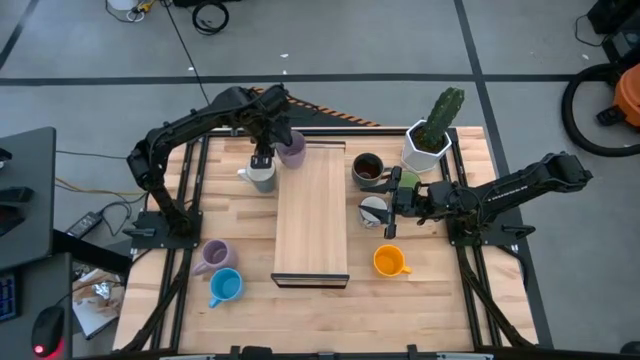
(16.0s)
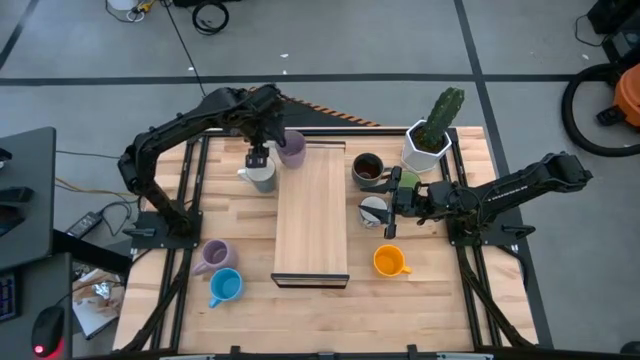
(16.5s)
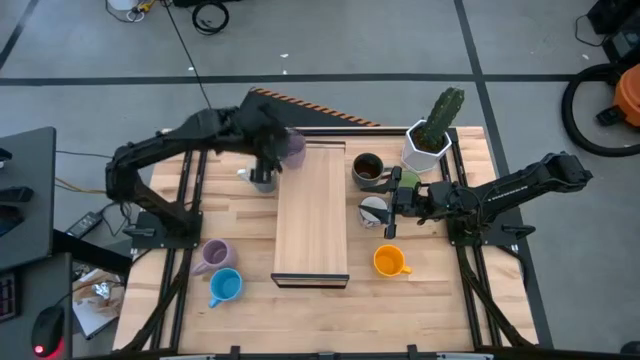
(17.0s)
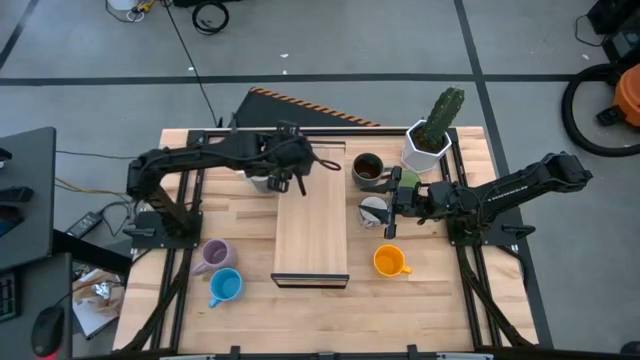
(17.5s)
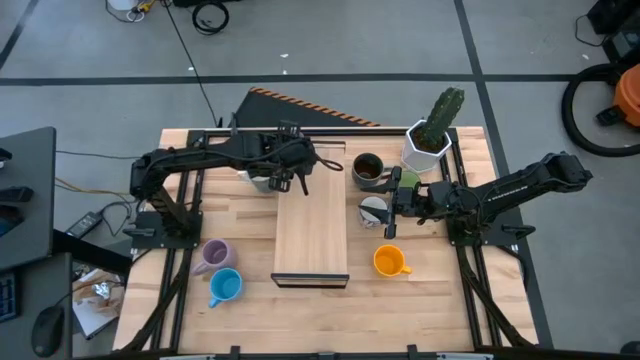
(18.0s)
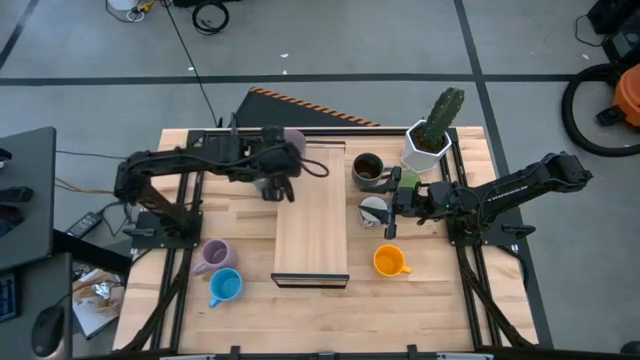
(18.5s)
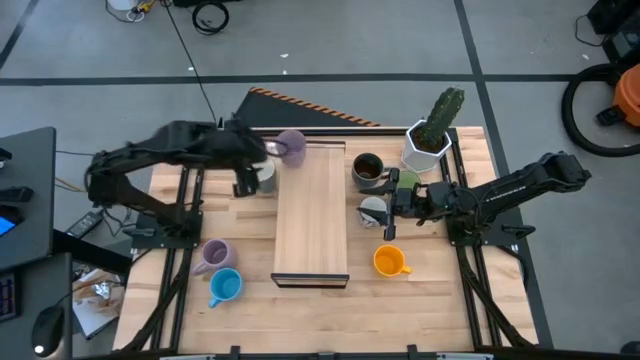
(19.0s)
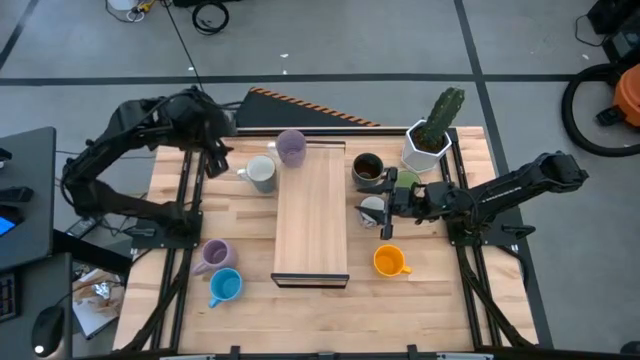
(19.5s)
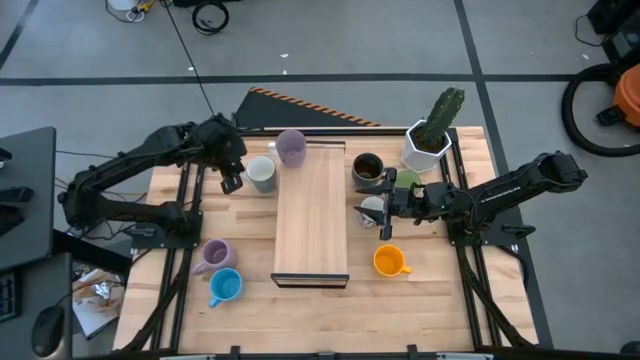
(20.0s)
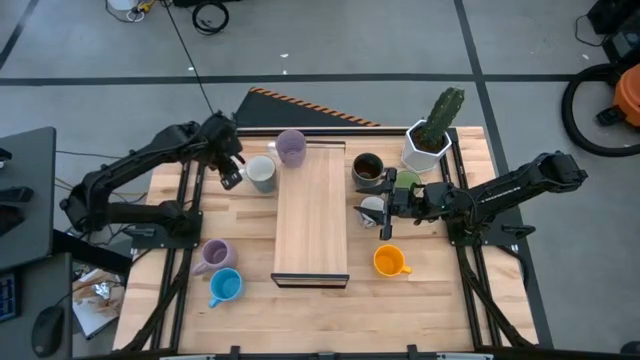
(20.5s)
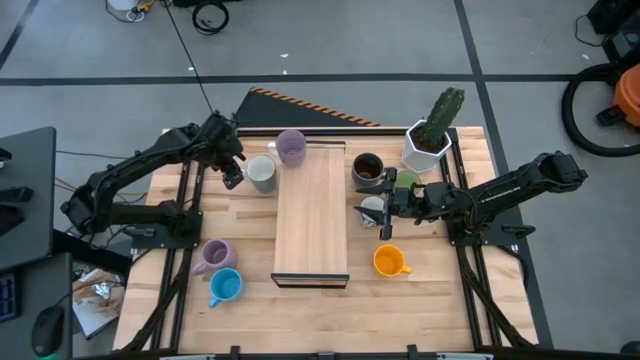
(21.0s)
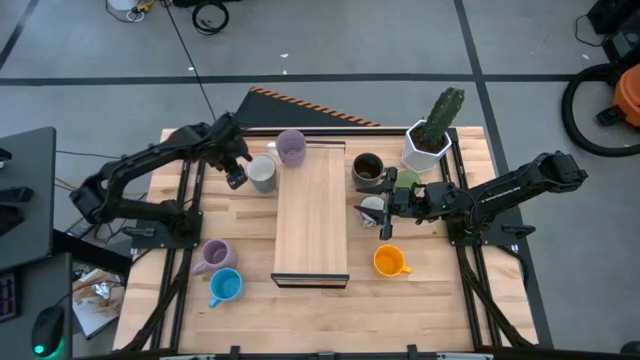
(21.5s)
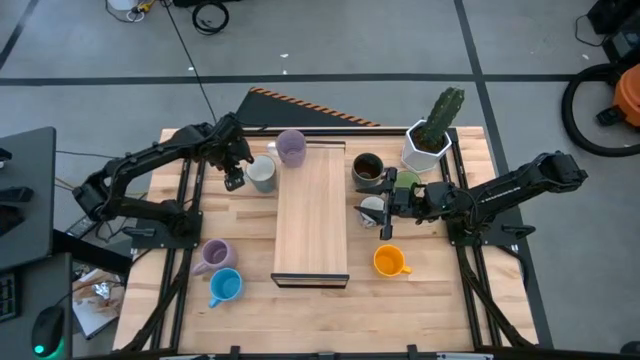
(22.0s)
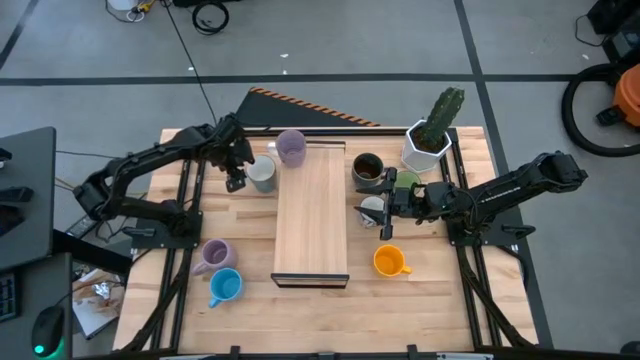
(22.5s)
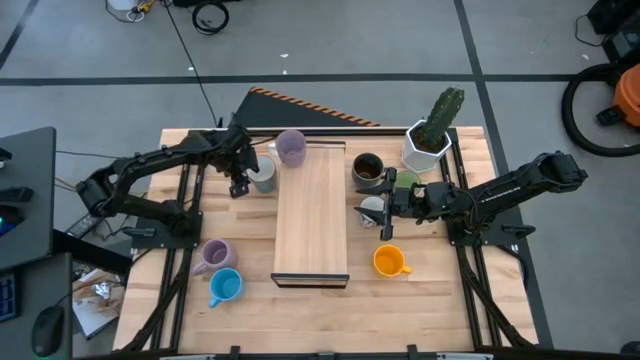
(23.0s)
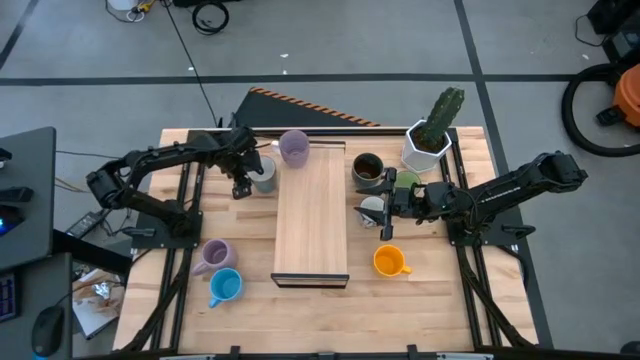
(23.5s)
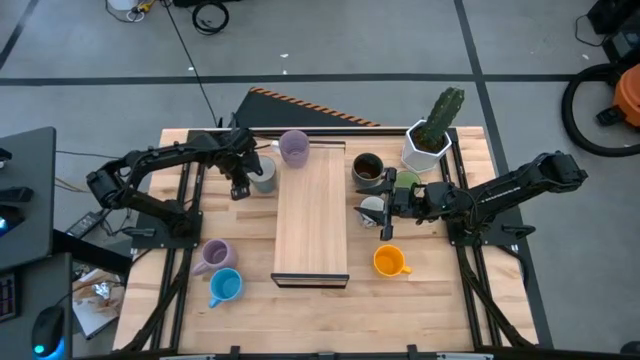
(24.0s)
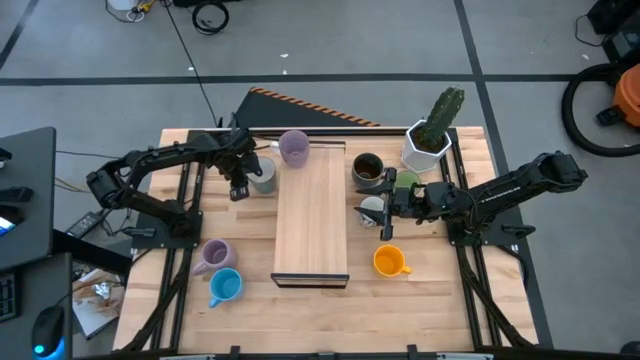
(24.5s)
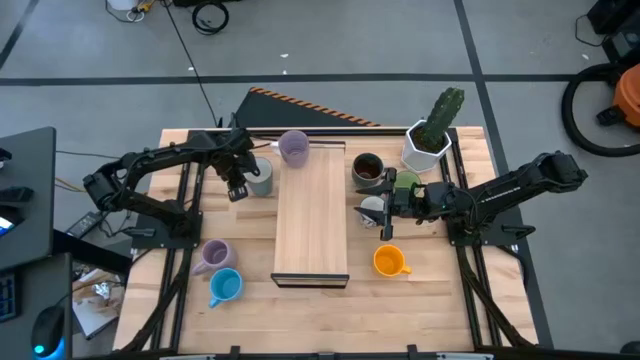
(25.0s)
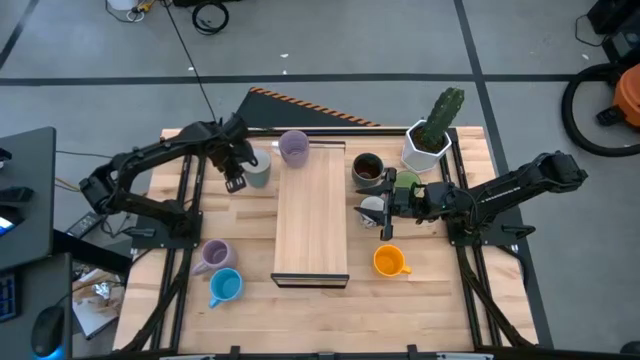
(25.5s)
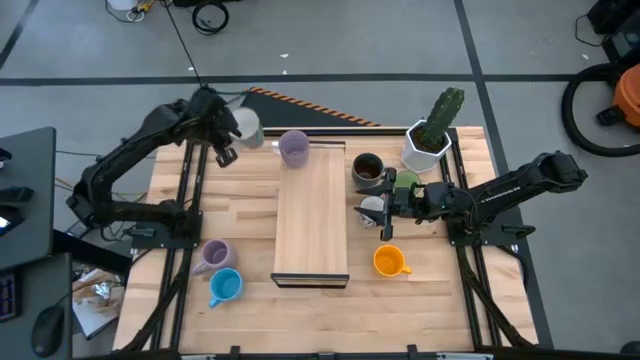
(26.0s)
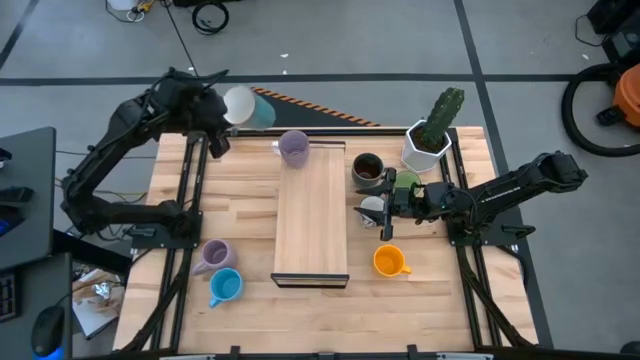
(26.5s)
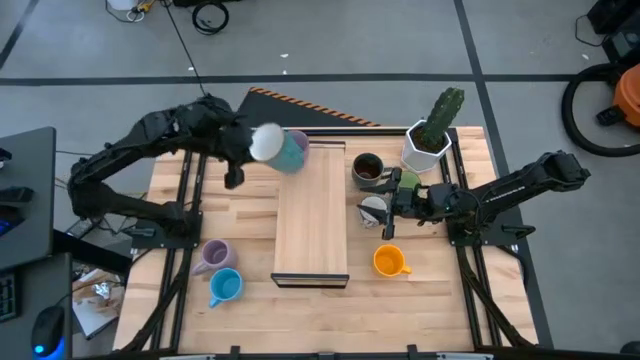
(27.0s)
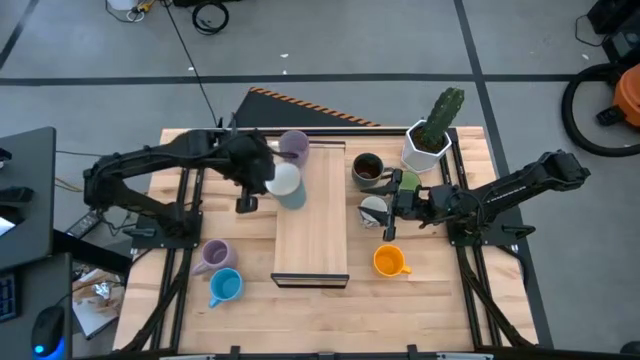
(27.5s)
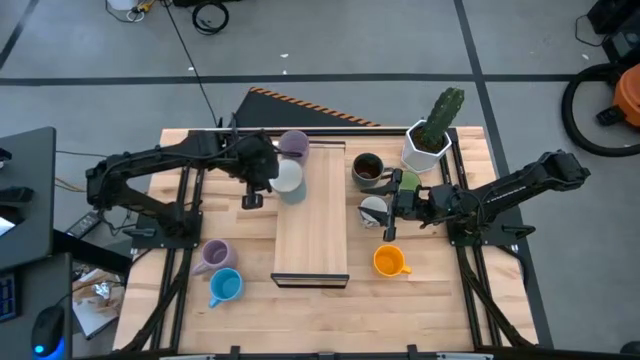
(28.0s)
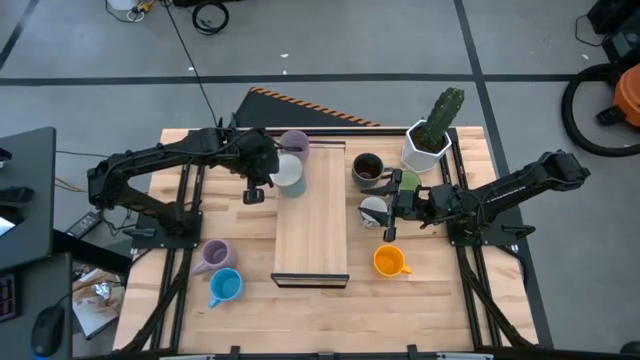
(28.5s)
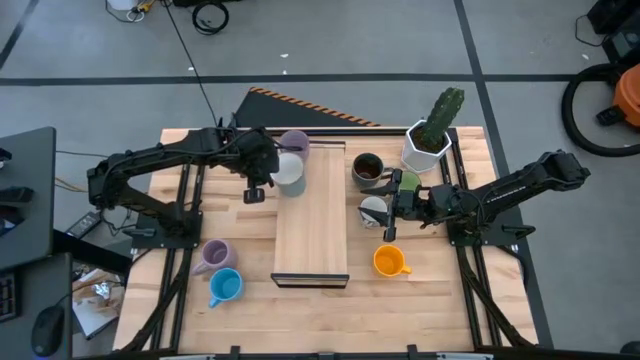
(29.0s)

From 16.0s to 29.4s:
Task: Place coffee mugs
Put the light green mug on the shelf

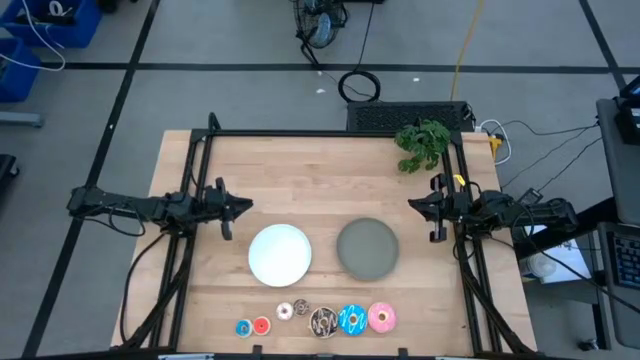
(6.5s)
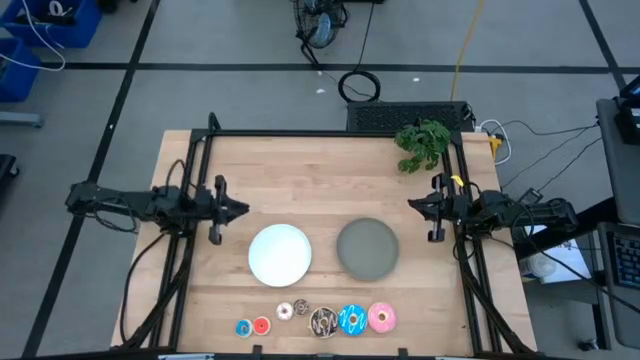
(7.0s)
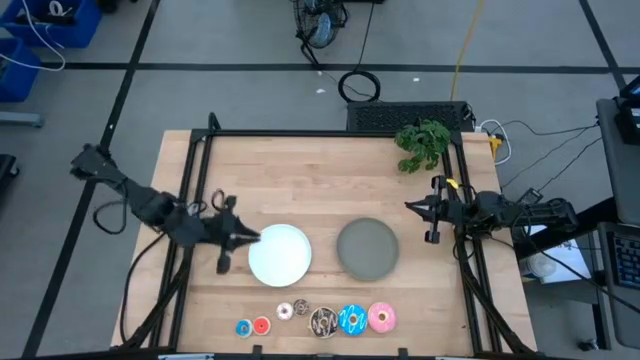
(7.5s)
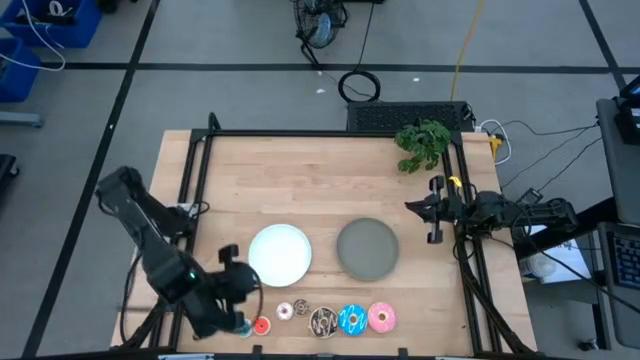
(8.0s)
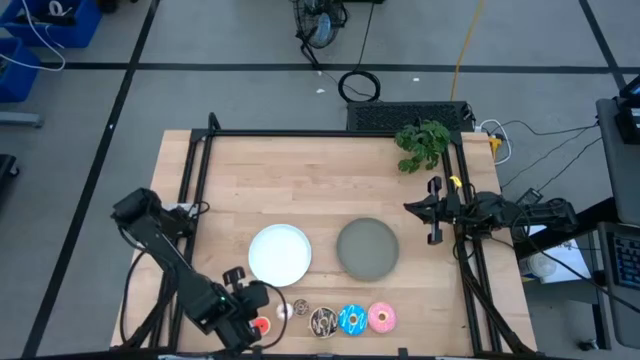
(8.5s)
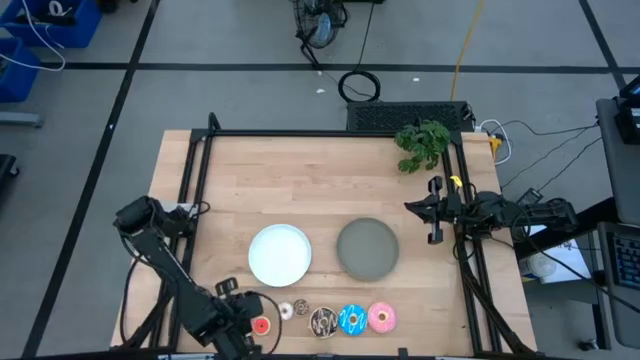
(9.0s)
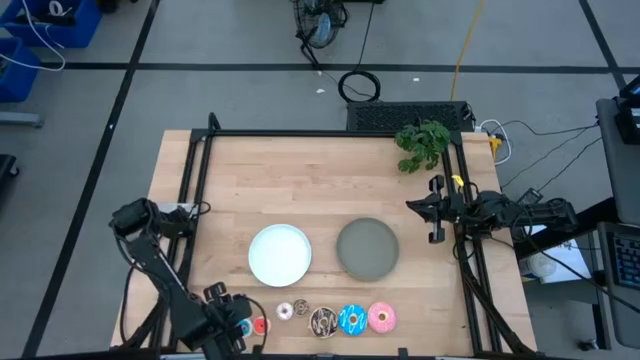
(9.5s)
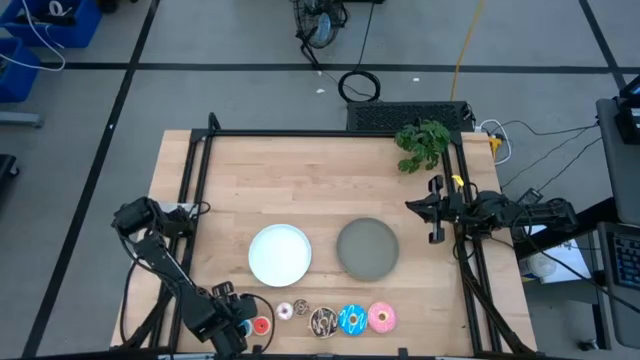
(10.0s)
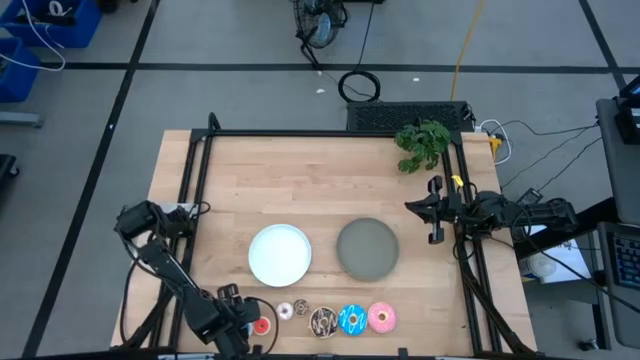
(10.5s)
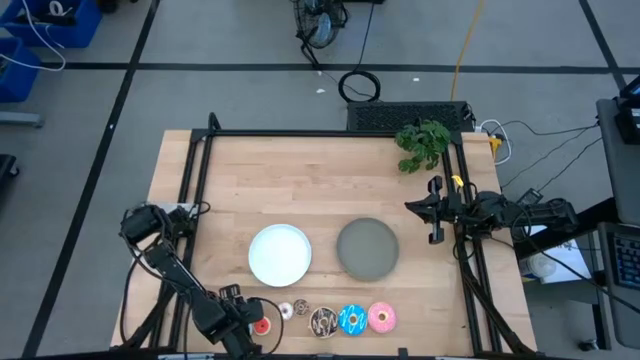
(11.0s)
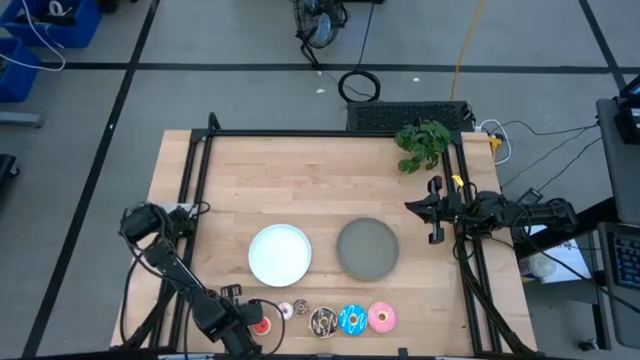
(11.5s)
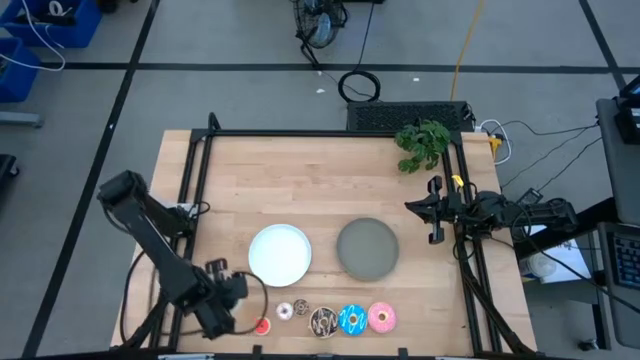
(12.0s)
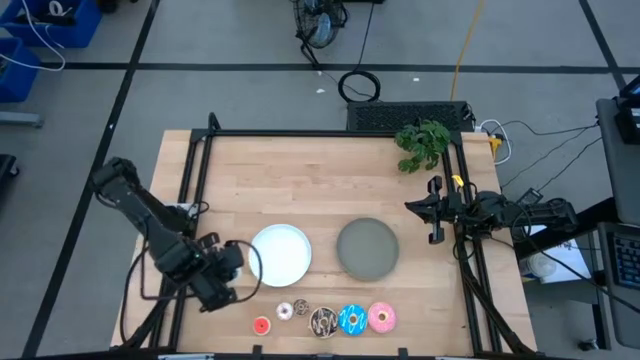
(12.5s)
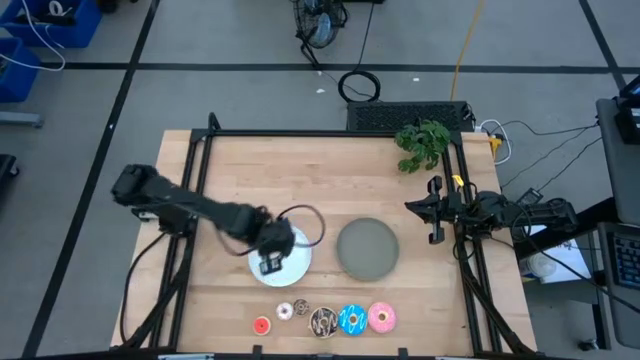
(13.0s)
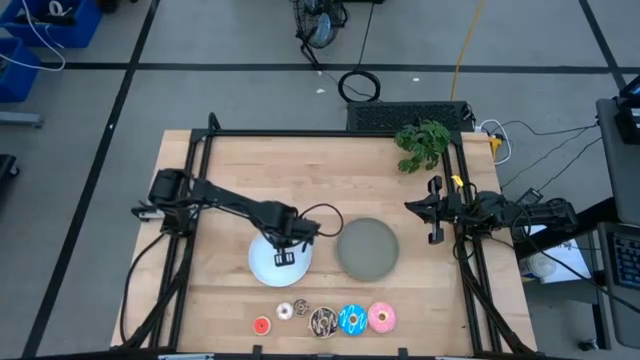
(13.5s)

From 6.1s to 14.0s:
Task: Pick & Place donuts
Put the small blue donut on the white plate
